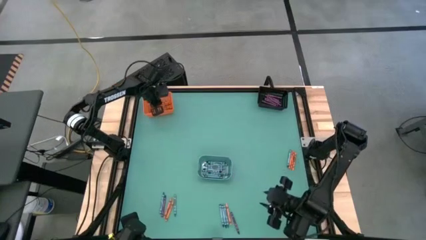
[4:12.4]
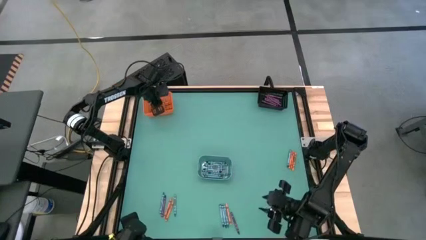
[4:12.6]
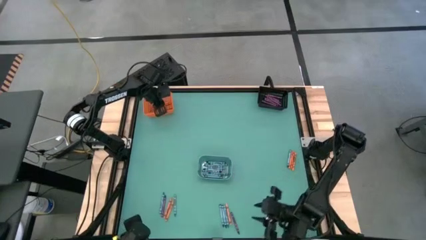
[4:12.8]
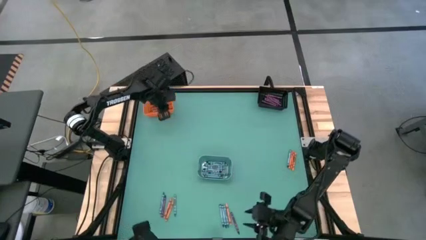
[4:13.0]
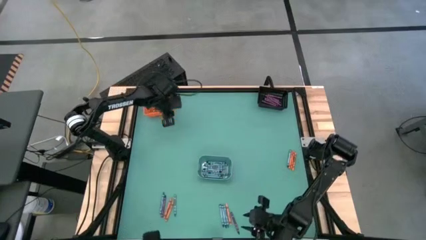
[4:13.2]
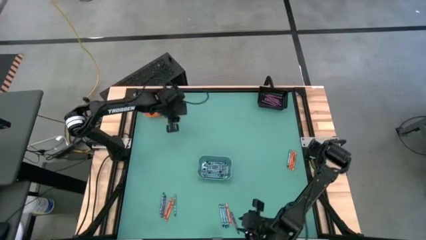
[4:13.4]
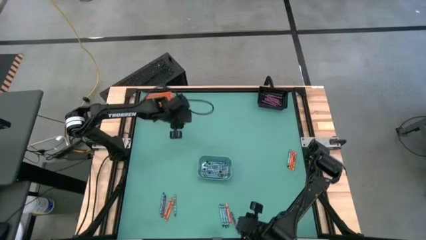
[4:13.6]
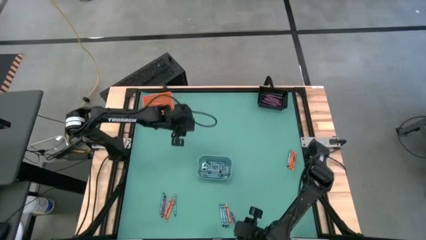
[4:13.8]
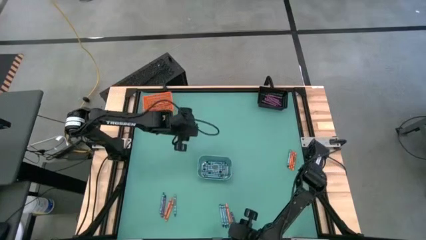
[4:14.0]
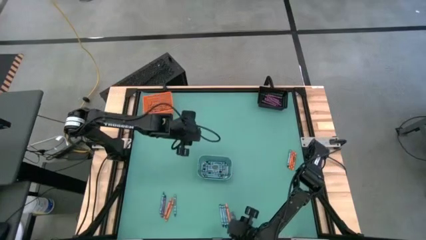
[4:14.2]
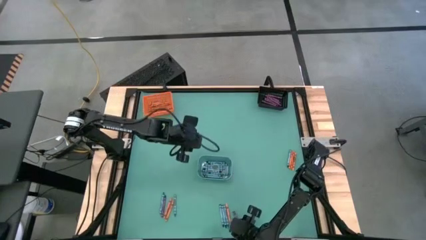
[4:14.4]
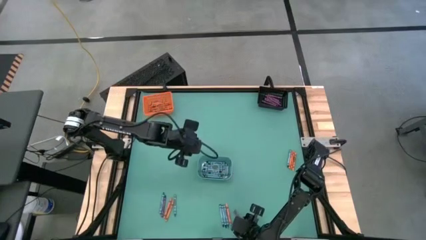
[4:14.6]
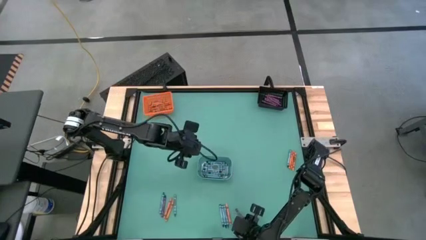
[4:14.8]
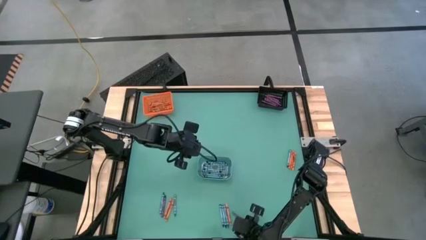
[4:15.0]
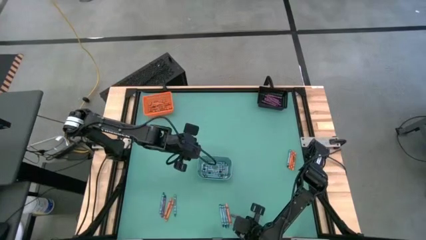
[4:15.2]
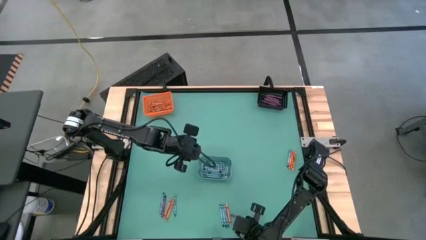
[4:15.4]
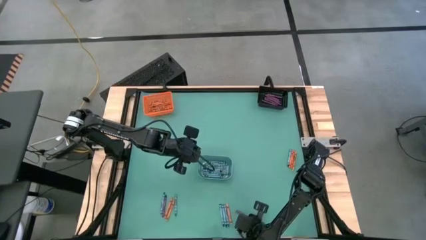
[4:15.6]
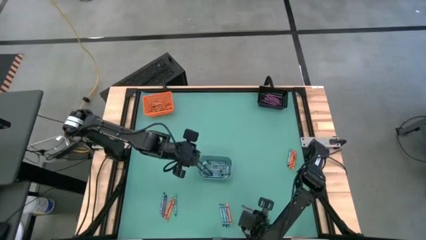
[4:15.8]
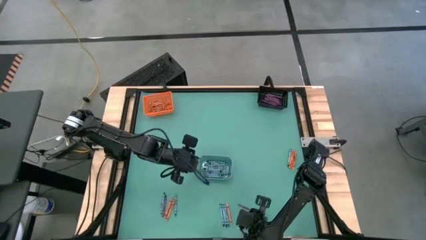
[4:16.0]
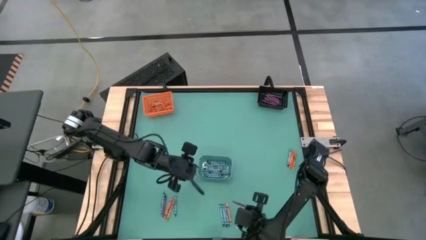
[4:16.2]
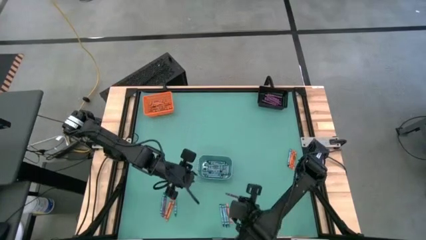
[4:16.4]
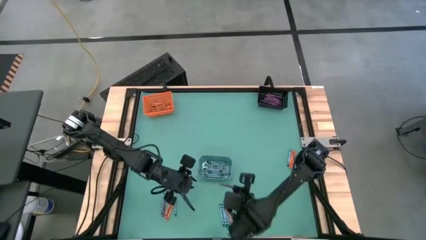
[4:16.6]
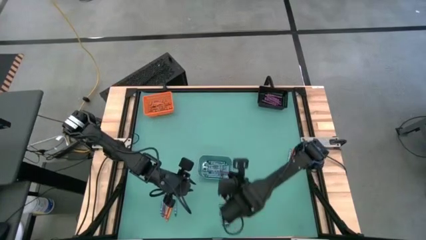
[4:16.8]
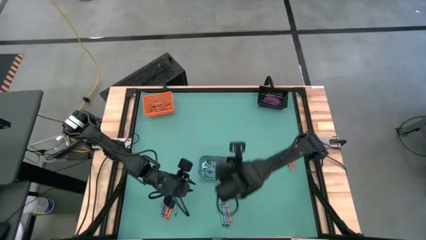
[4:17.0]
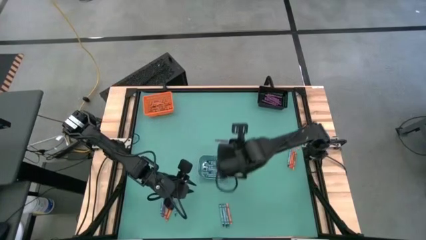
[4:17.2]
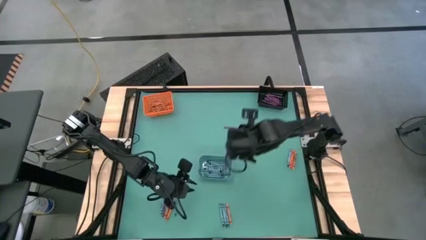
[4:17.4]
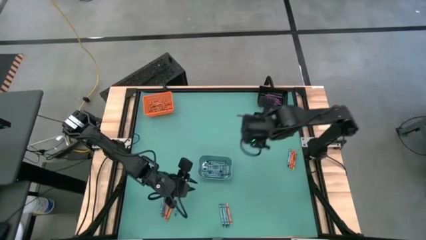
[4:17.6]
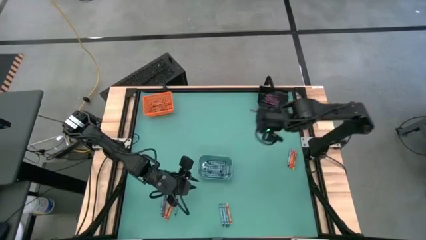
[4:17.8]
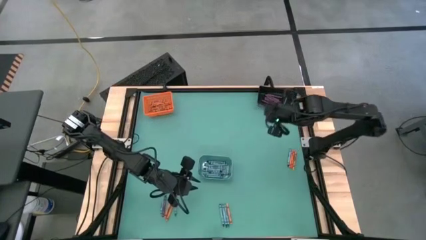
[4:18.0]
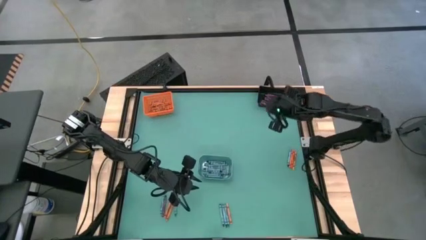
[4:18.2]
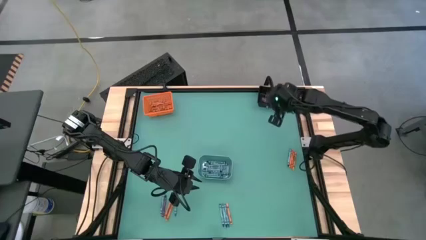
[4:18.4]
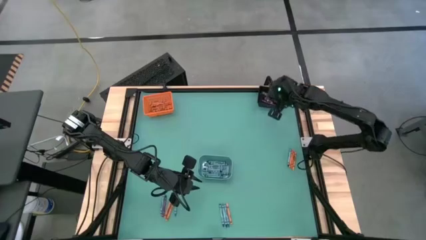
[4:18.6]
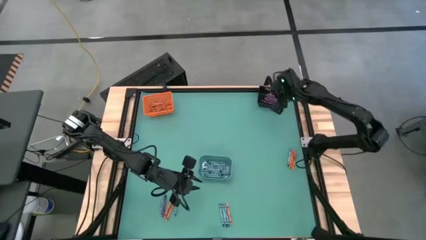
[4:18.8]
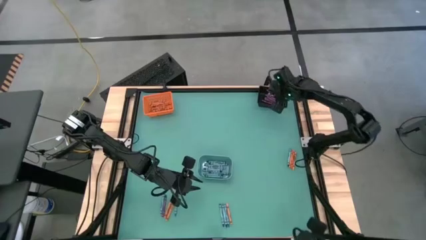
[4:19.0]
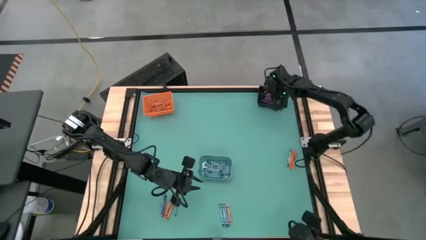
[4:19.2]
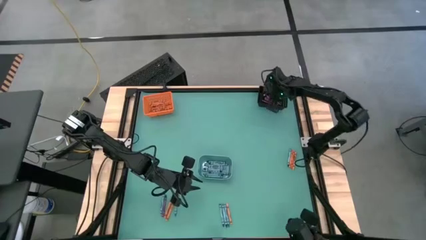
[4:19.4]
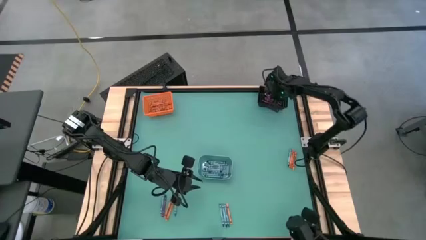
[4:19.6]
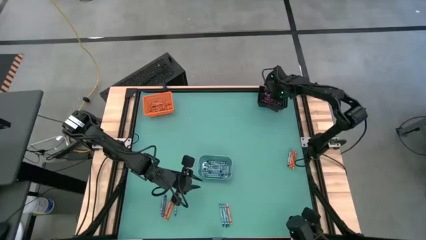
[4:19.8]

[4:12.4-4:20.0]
Task: Sort crayons
Put the violet crayon into the black bin

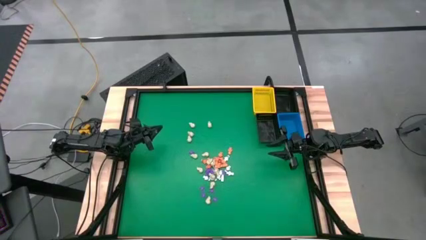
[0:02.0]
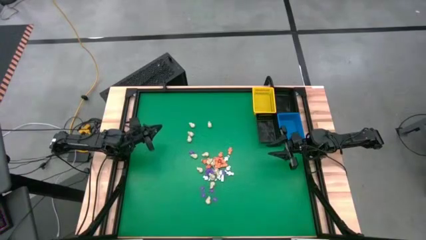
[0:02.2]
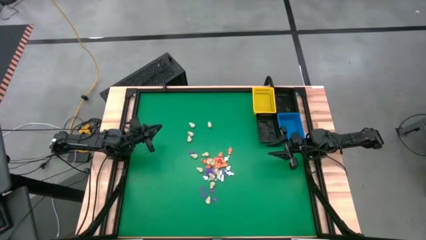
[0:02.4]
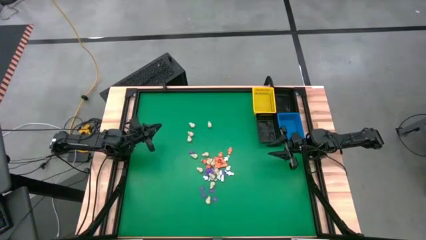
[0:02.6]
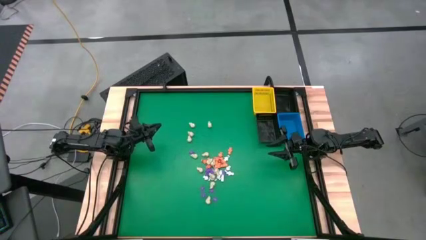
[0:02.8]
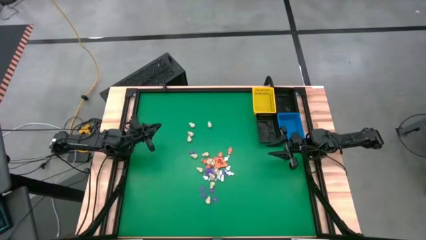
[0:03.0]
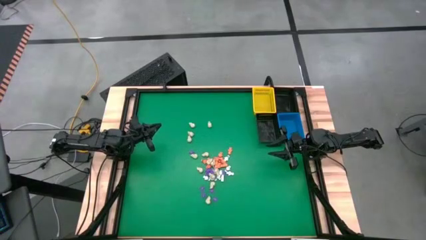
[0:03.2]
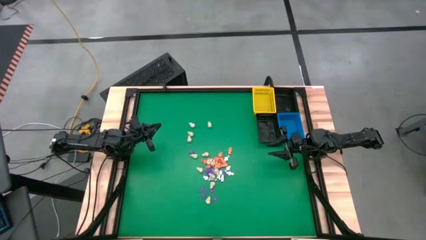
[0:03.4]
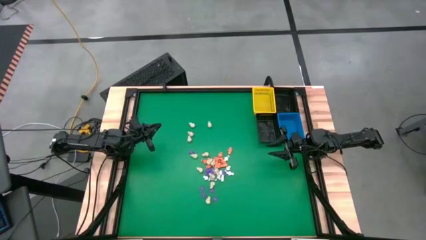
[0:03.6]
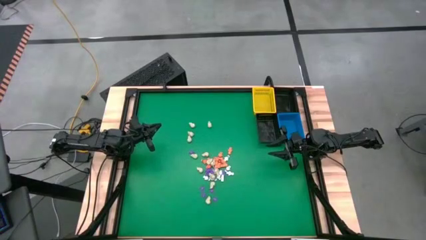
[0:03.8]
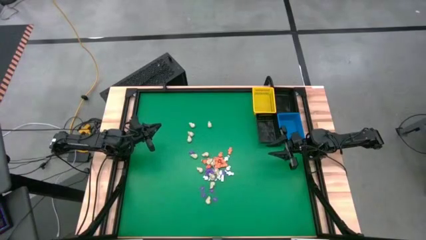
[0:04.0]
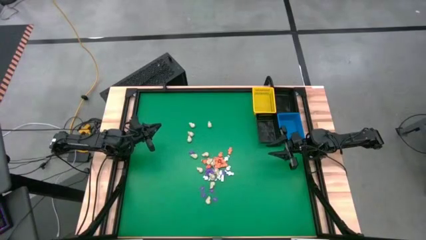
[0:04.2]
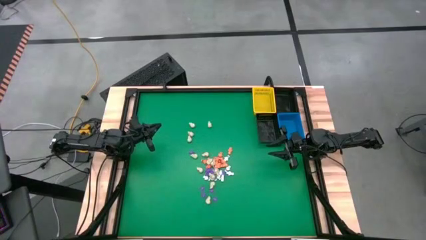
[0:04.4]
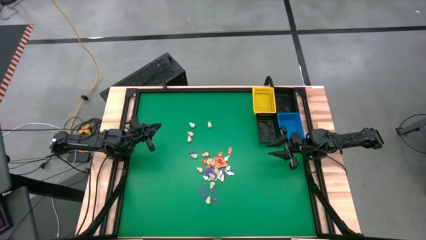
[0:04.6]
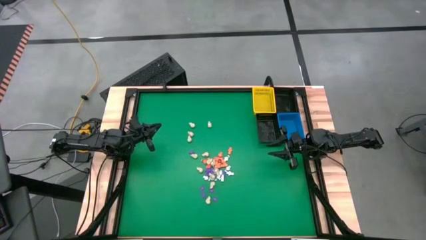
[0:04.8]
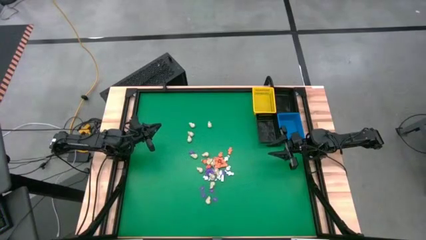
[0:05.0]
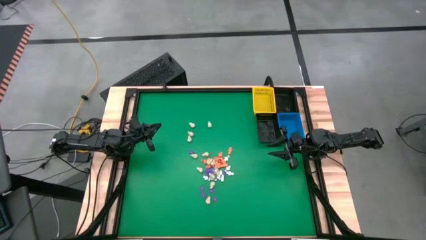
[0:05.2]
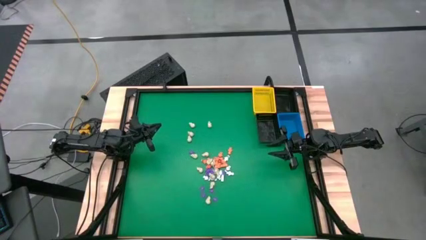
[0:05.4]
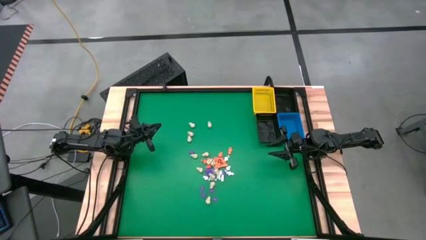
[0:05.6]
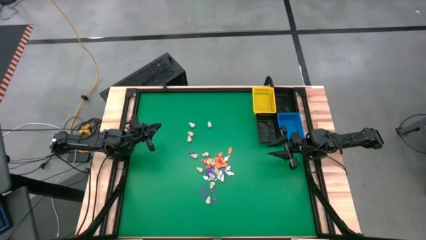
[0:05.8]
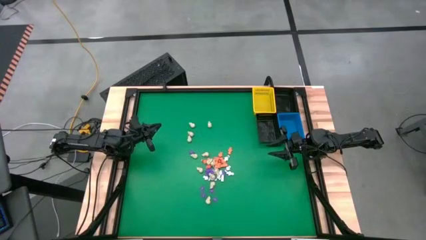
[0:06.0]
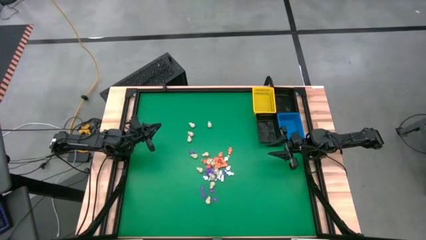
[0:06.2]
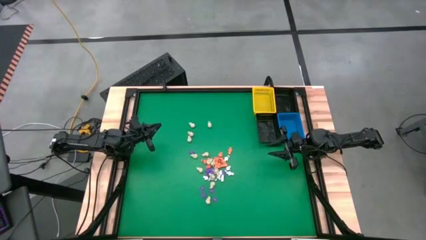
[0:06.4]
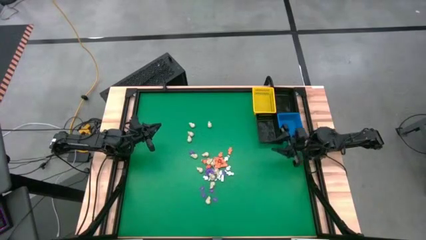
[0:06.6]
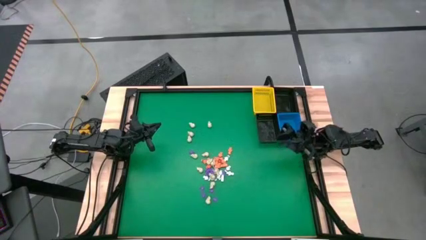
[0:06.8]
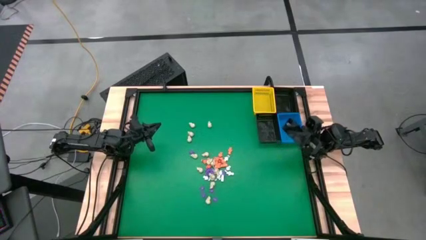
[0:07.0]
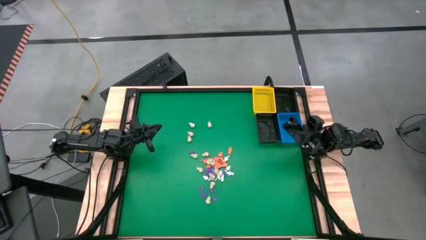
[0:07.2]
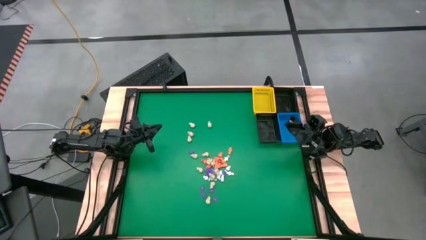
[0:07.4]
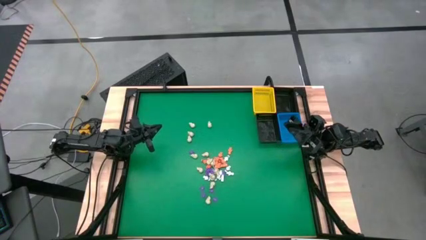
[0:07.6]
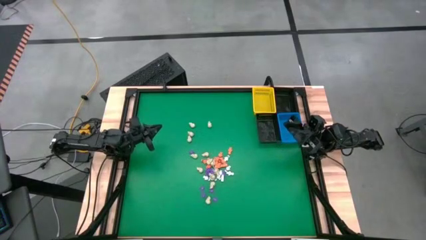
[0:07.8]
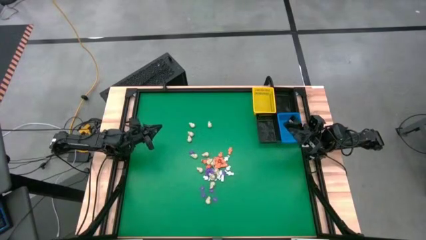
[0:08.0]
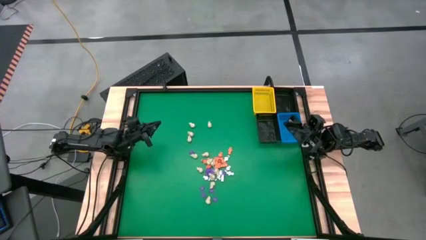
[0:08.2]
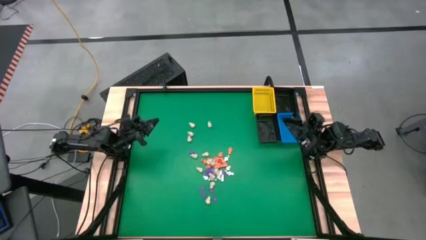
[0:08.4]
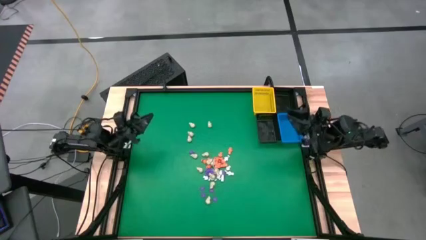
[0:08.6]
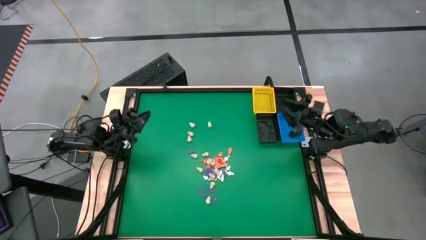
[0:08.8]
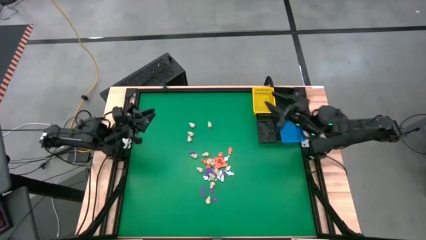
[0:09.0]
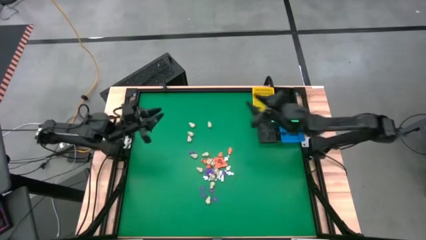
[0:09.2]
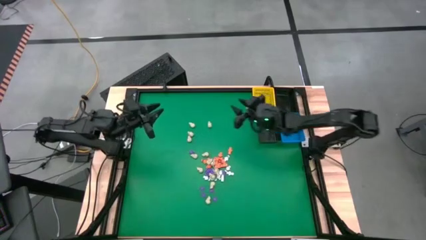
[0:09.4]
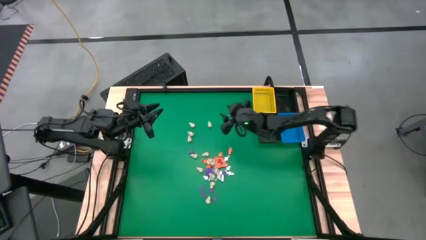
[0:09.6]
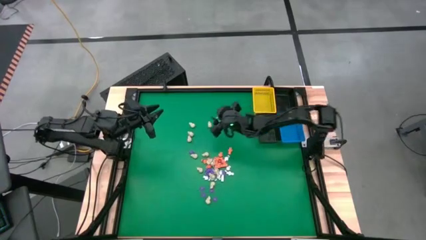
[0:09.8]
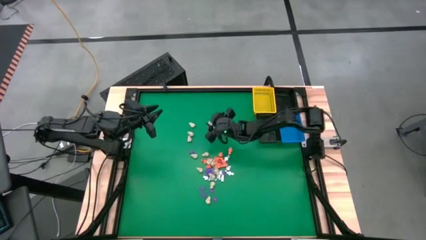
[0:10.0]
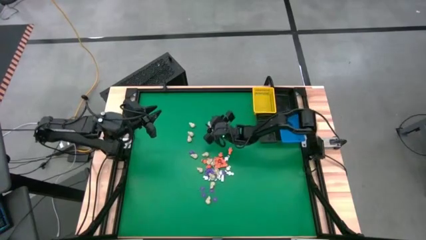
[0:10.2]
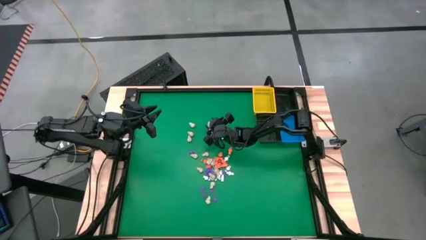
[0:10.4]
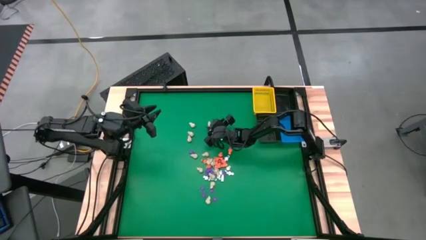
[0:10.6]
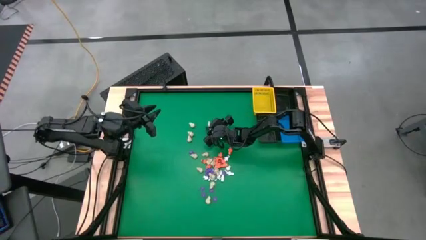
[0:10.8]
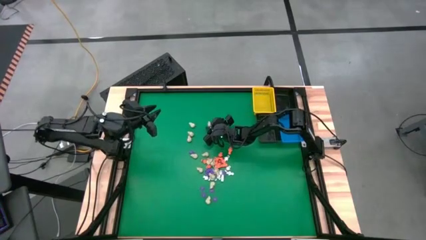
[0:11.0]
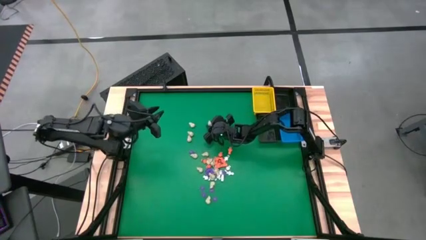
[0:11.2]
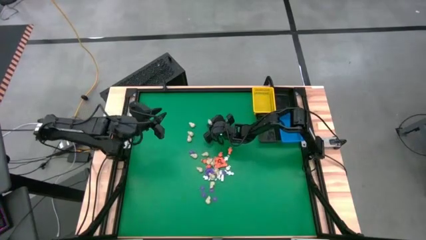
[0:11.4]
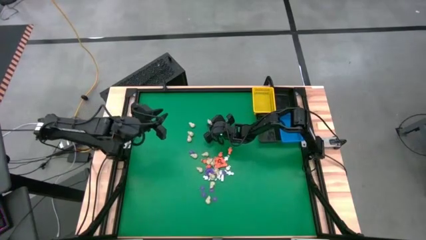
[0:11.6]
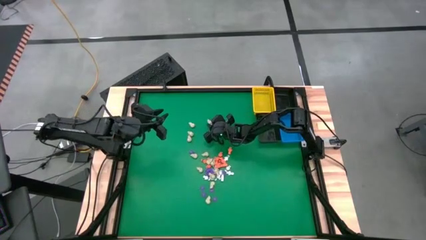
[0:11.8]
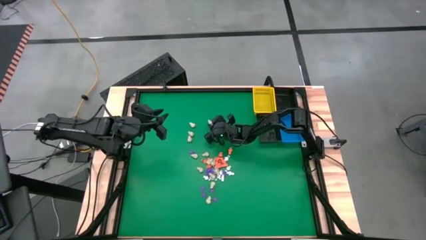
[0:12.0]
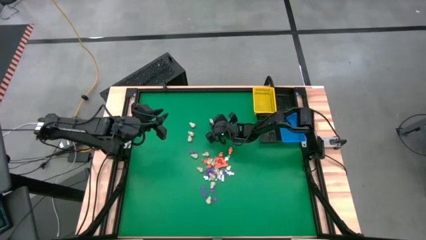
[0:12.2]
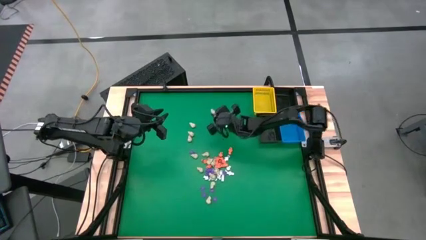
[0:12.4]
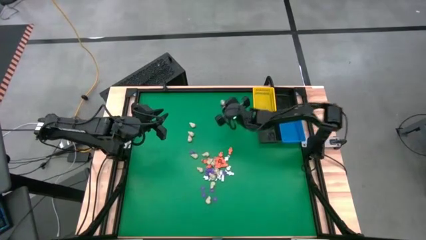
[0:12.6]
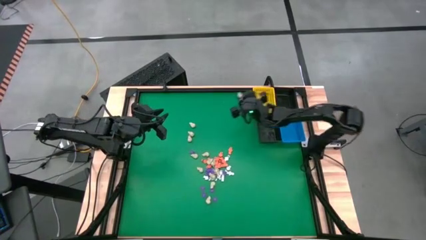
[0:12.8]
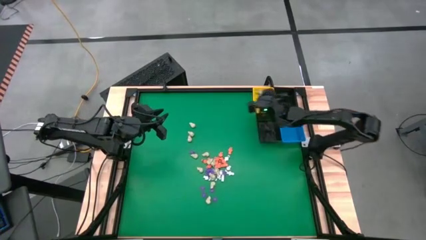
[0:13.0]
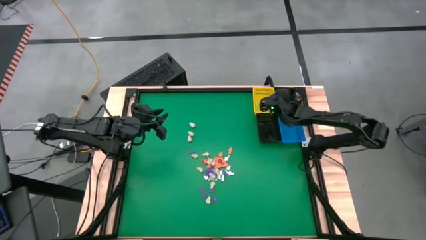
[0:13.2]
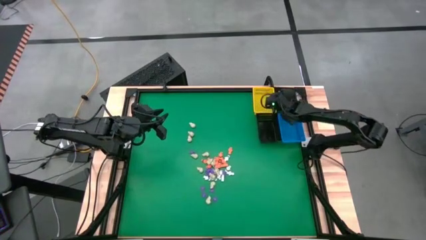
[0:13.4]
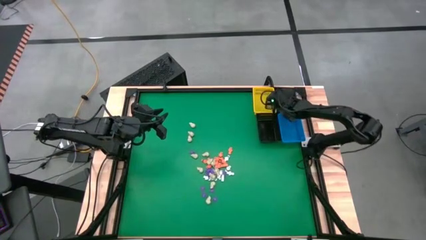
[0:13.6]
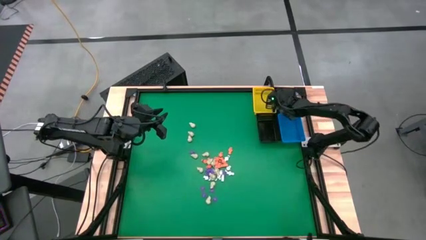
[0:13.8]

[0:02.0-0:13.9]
Task: Sort Halloween decoration
Put the gray skull toy into the top black basket
